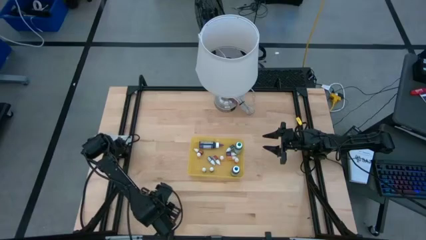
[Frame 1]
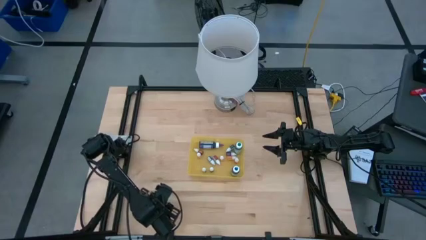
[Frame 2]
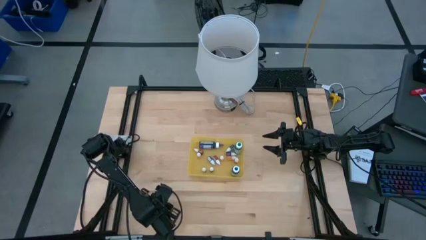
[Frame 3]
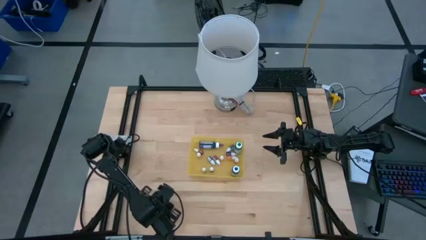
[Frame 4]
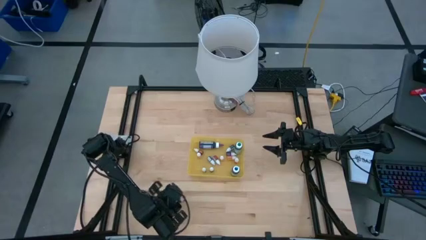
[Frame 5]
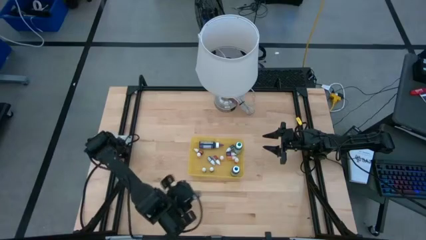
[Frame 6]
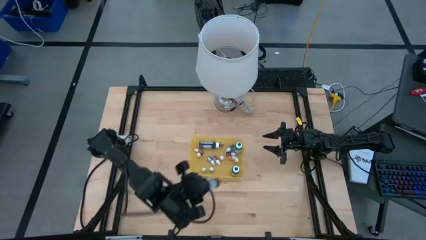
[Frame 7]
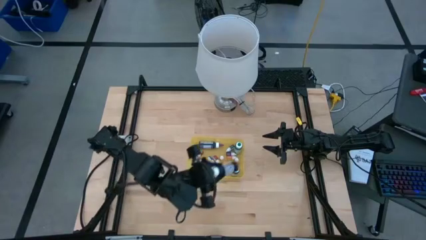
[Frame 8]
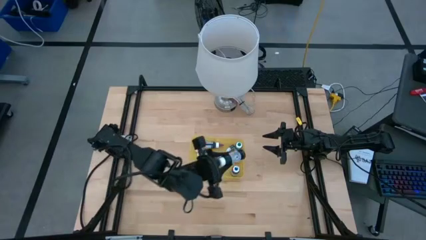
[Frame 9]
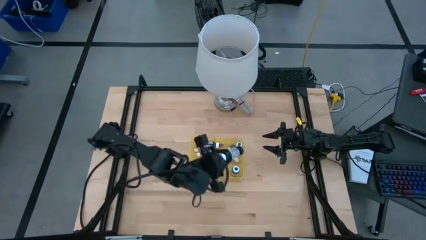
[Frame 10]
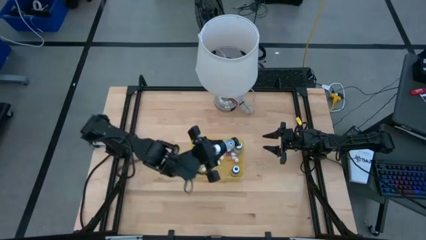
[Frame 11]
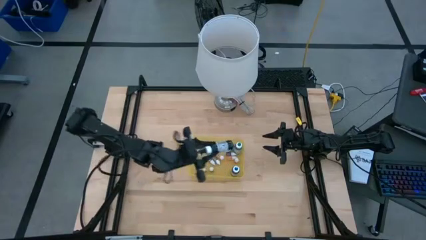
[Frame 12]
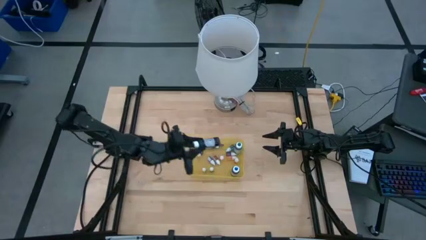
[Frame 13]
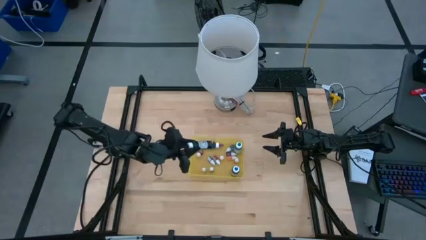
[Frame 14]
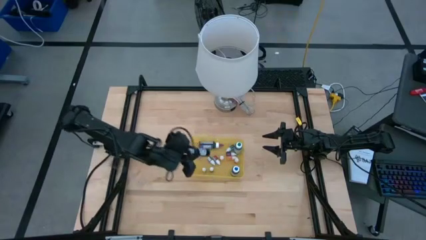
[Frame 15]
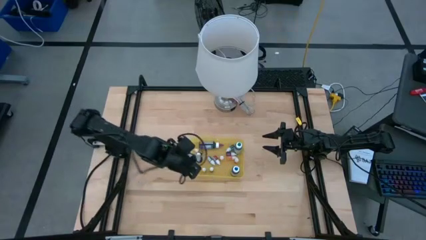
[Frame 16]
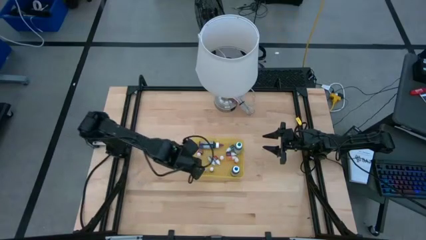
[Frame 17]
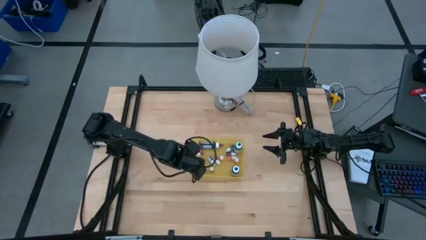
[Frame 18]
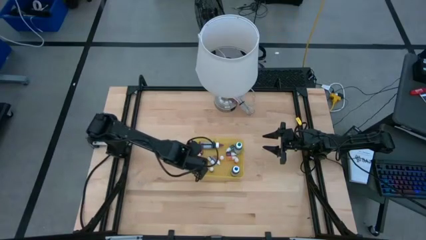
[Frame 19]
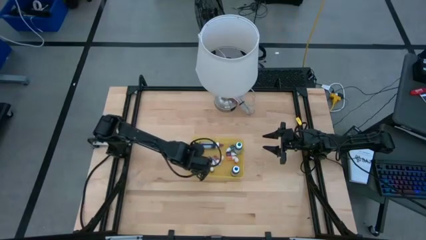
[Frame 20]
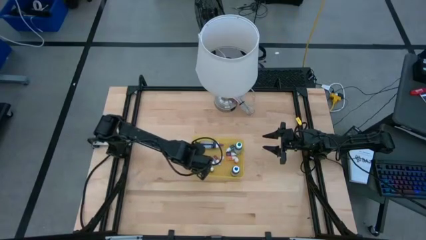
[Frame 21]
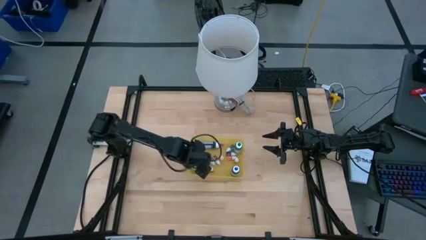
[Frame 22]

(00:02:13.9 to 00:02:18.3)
Task: Pick & Place food coloring
Put the black food coloring bottle into the yellow bin

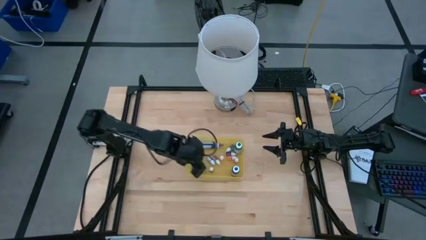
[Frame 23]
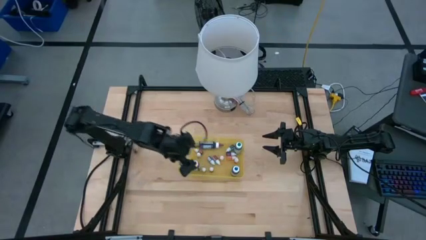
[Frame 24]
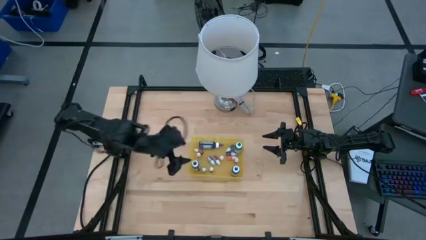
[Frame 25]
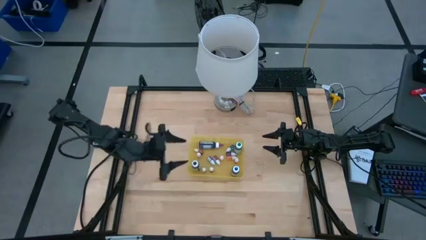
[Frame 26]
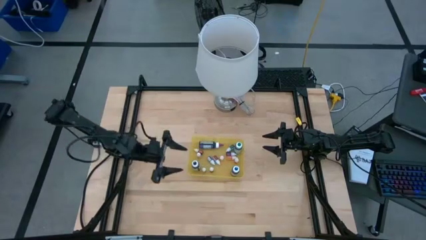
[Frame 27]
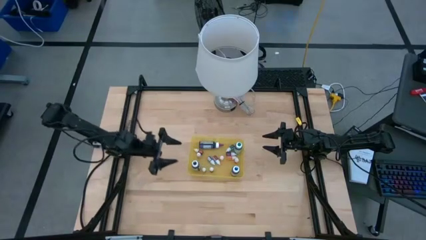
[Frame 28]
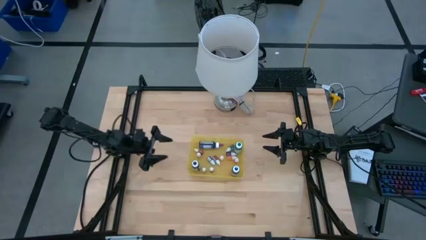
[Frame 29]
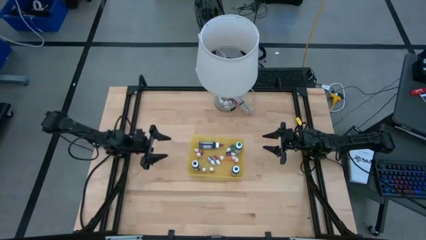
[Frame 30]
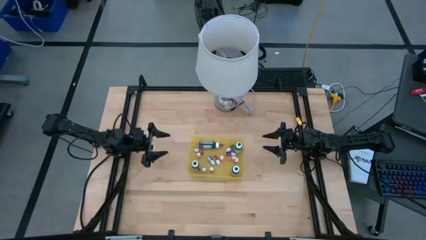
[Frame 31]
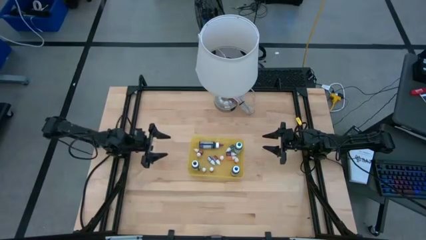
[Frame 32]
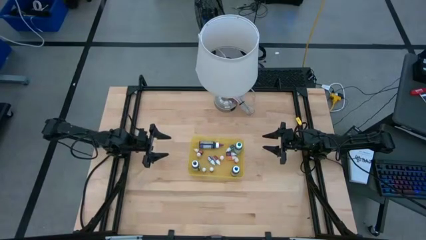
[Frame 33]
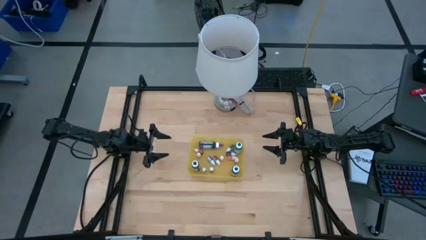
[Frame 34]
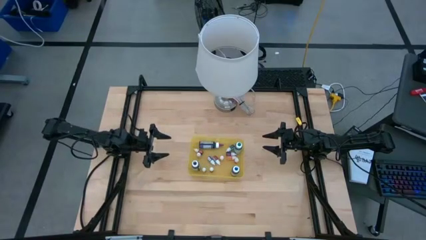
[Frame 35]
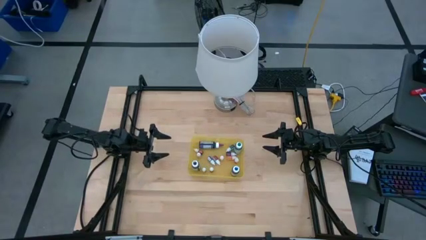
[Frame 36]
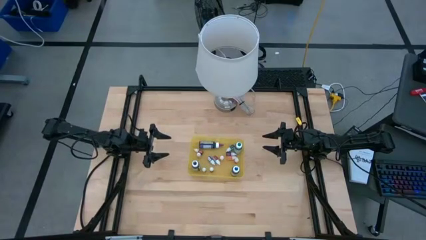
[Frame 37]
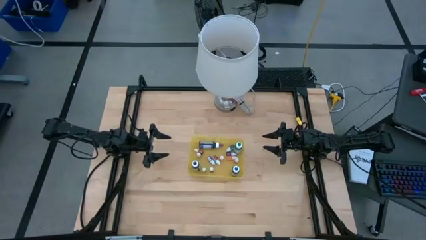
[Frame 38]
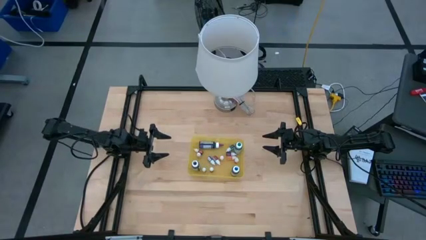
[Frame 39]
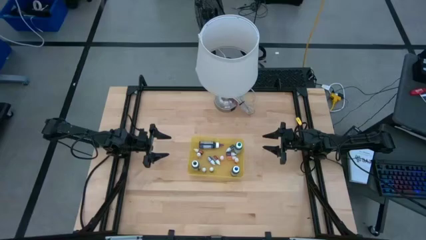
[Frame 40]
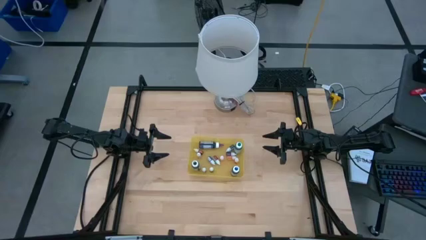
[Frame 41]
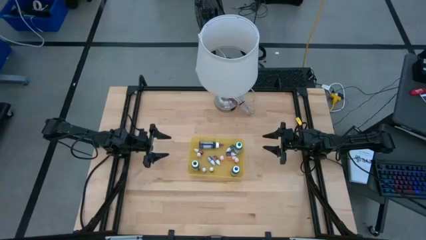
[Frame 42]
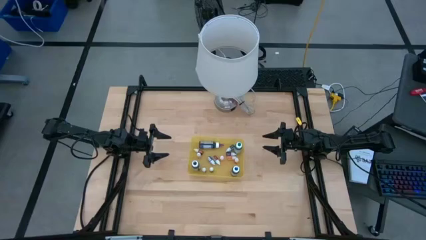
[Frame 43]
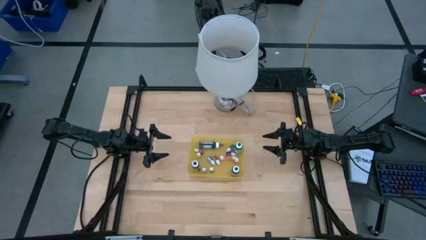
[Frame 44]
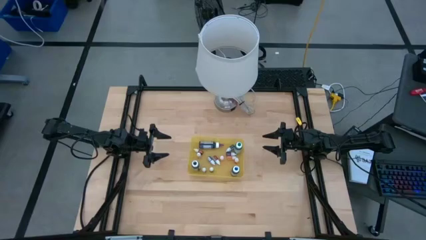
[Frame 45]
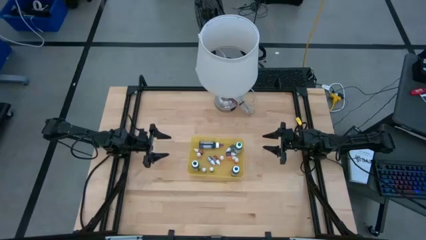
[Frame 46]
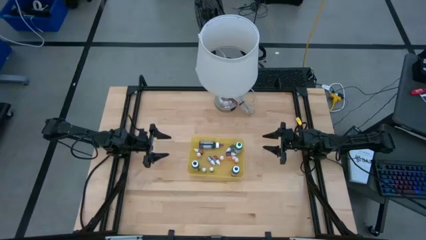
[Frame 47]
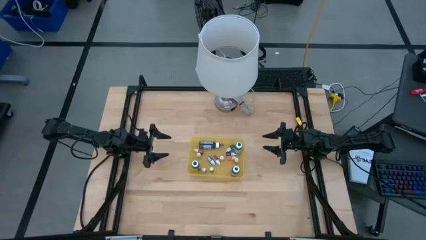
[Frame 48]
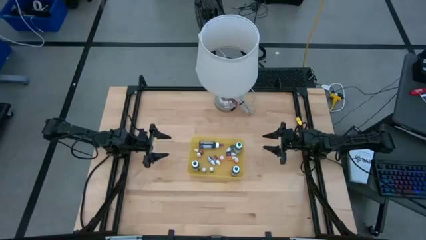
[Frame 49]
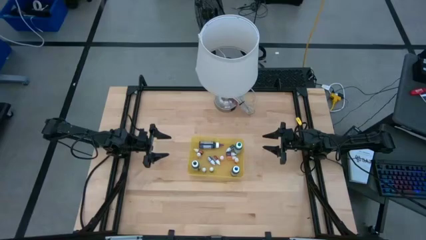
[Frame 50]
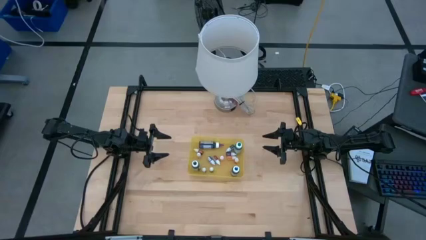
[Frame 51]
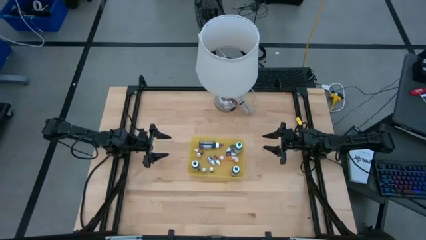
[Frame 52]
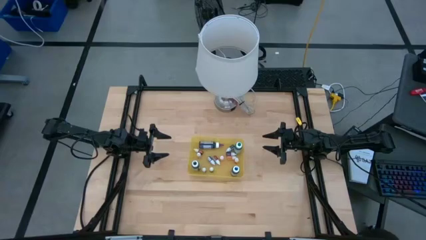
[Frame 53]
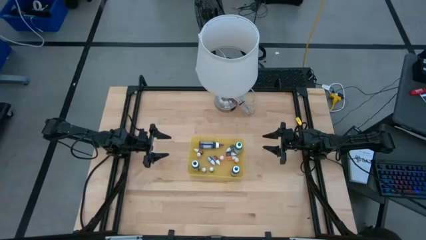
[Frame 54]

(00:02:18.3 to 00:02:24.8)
Return to Home Position

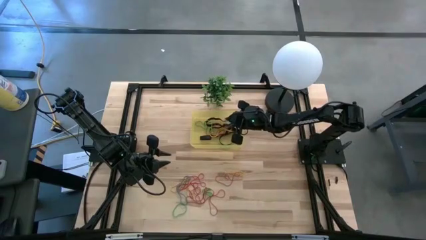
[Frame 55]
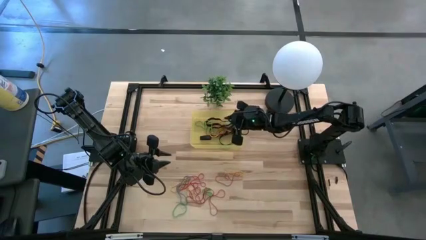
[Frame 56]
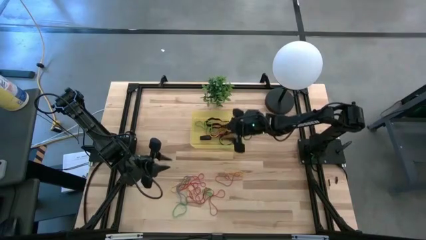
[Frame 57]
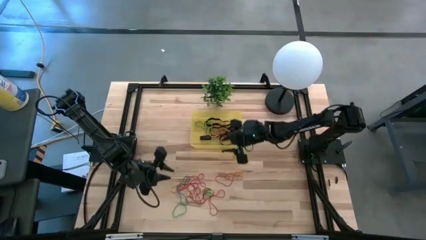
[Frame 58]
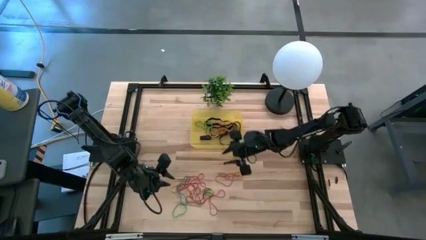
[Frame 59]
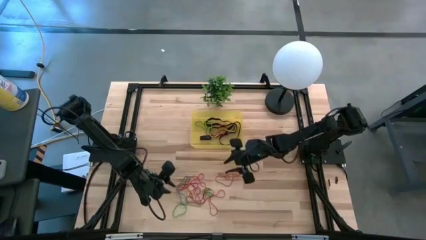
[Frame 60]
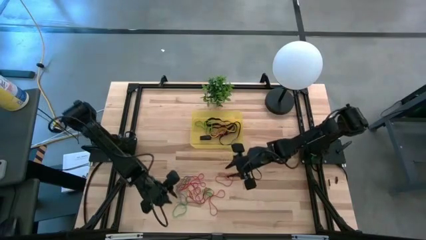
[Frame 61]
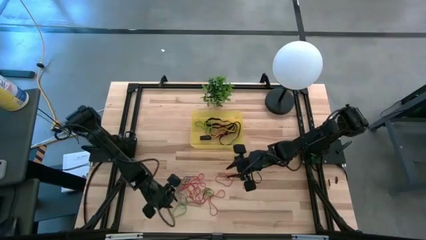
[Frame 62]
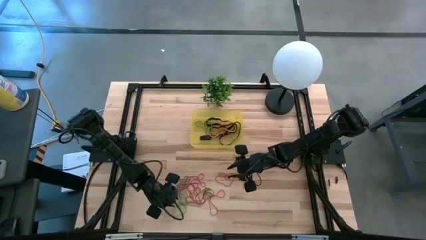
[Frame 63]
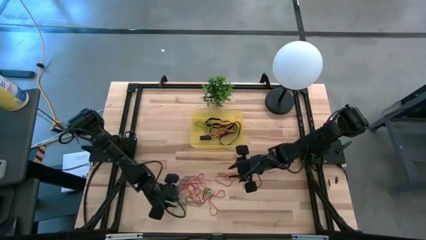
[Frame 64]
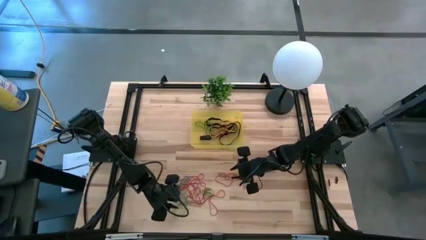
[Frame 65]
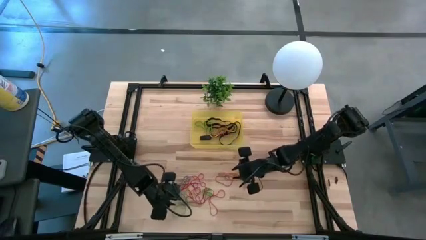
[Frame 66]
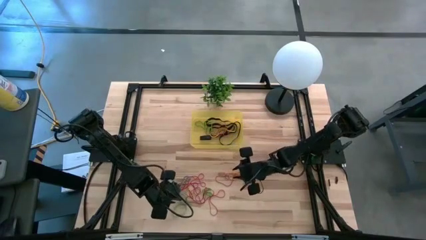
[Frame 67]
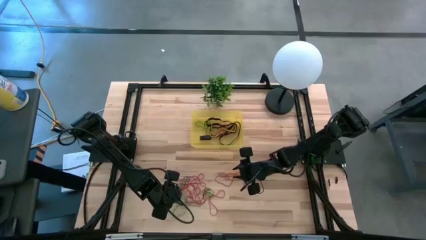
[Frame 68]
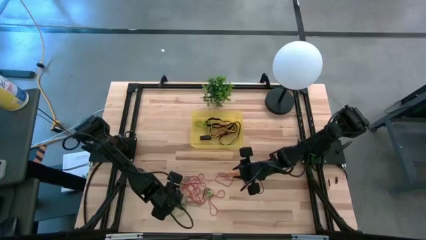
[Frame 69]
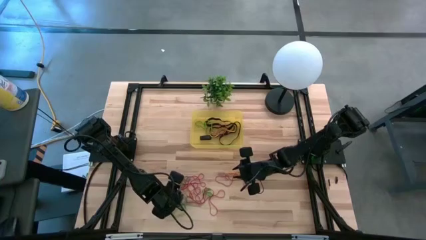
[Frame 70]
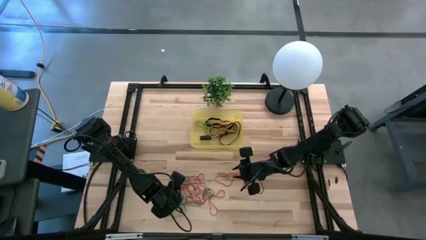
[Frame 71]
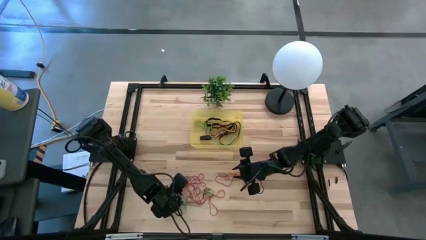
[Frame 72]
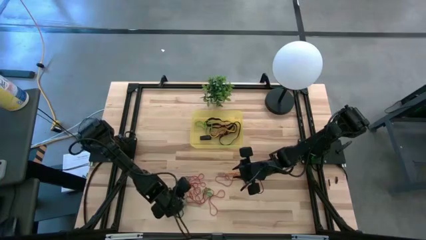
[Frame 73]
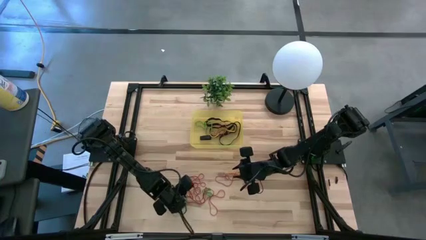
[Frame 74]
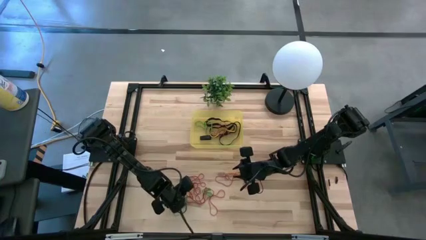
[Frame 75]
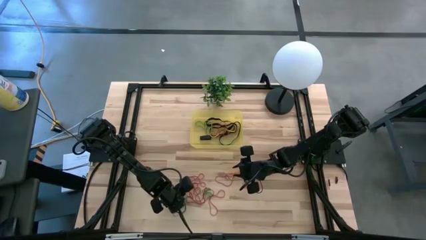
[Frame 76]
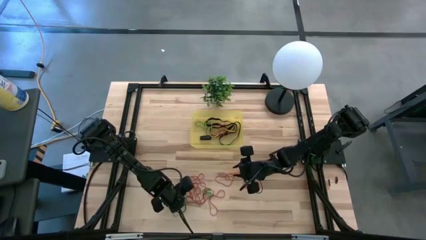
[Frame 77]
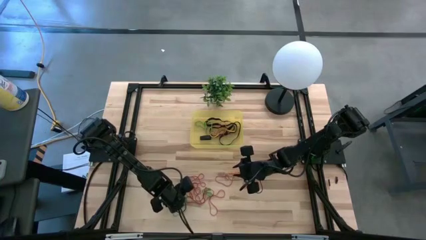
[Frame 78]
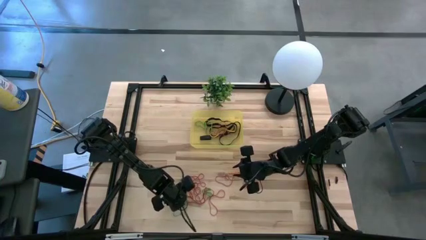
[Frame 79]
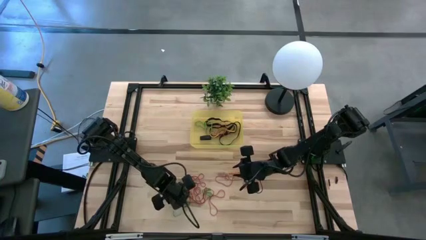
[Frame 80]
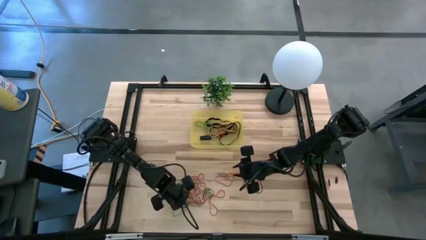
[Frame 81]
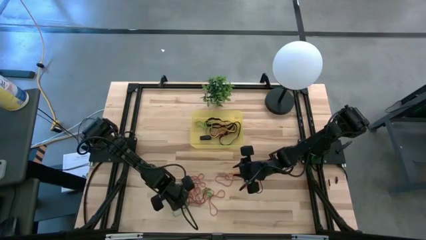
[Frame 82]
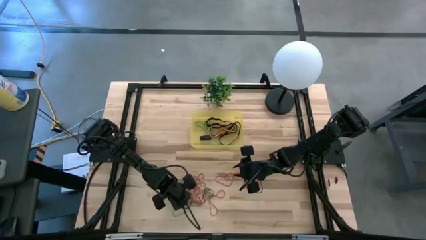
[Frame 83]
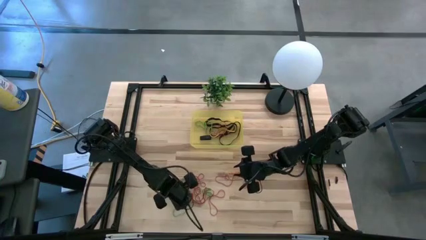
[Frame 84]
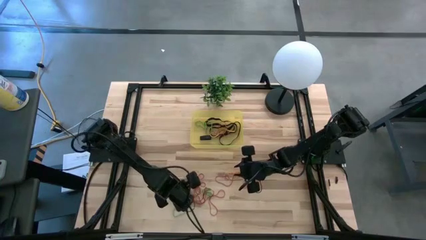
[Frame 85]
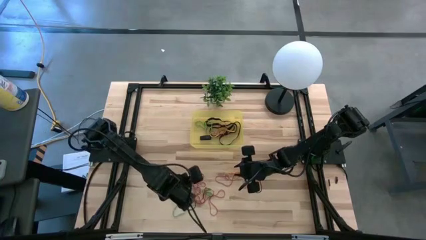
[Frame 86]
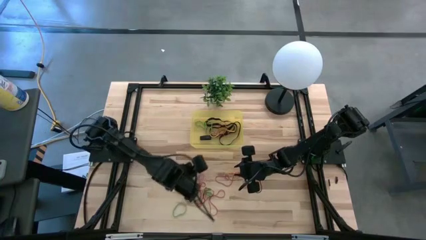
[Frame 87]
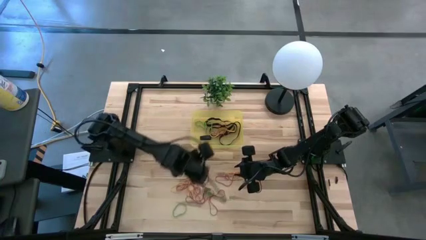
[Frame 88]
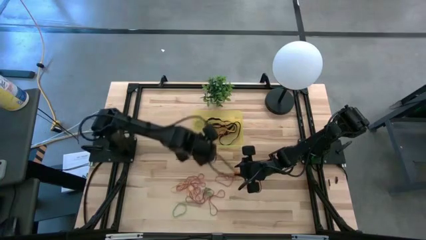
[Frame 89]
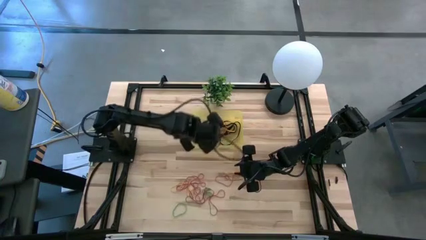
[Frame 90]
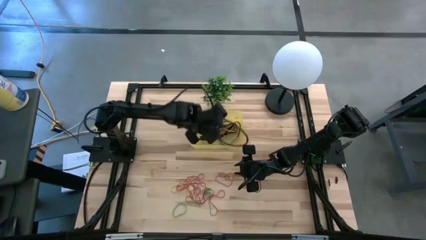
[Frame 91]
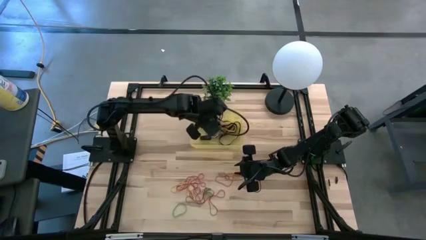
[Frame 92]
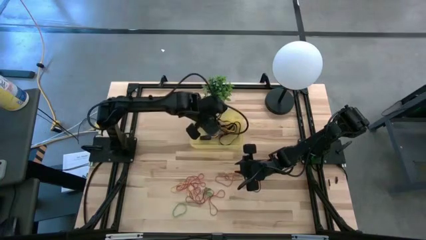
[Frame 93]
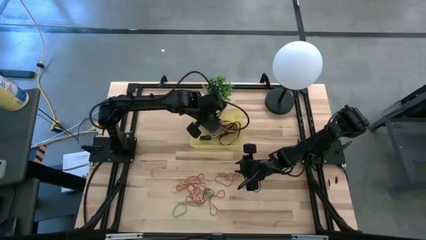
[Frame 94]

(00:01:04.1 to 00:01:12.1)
Task: Pick and place rubber bands into bin
Put the blue rubber band into the yellow bin
